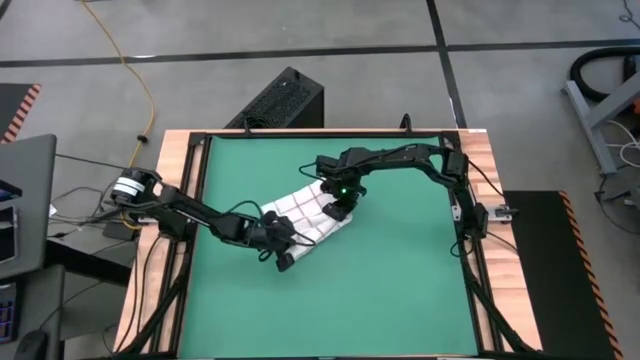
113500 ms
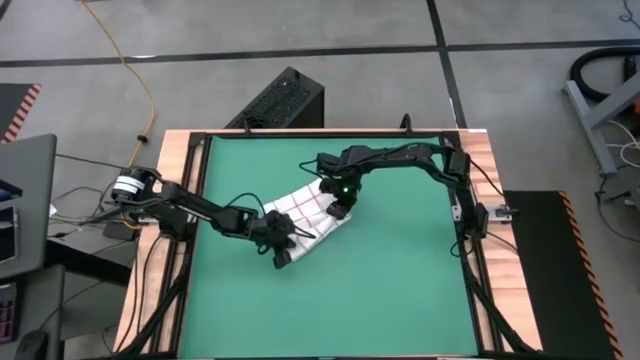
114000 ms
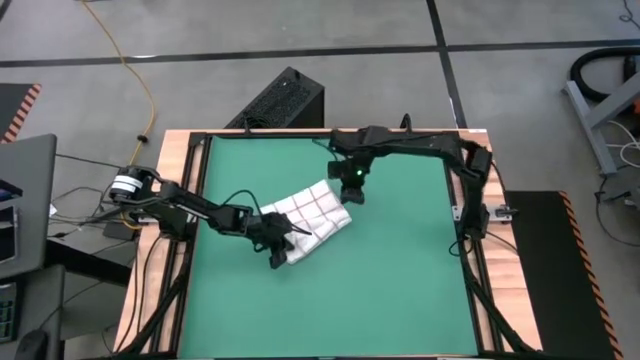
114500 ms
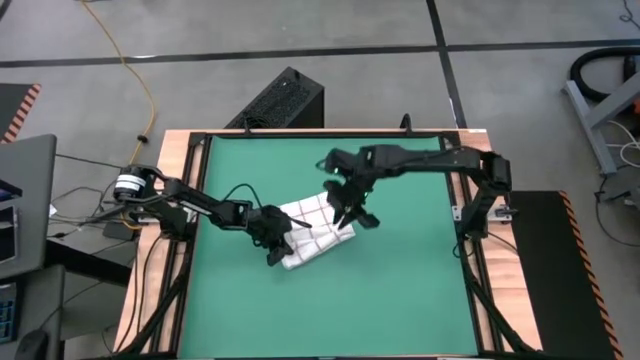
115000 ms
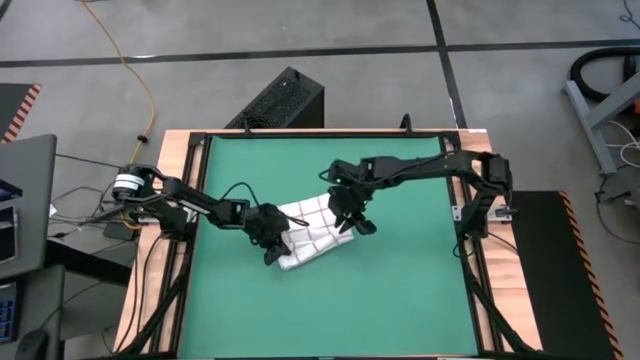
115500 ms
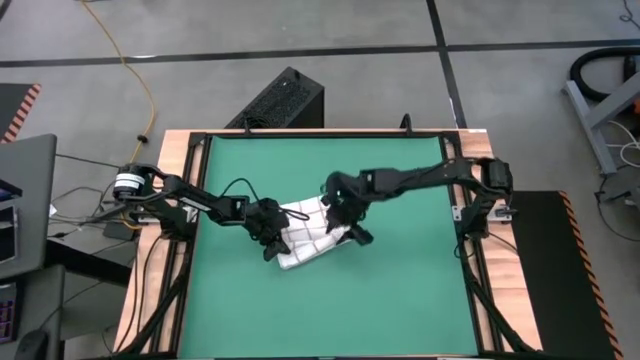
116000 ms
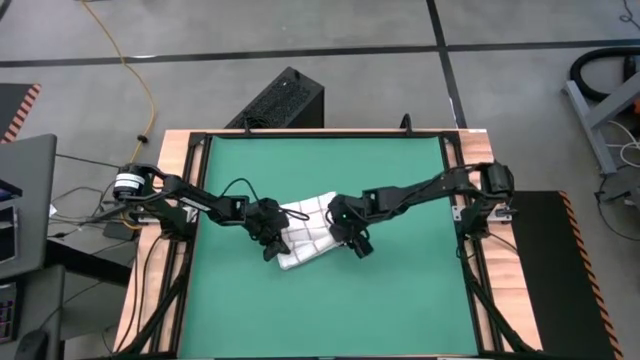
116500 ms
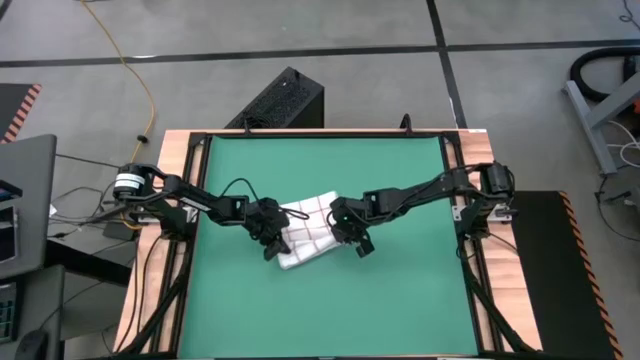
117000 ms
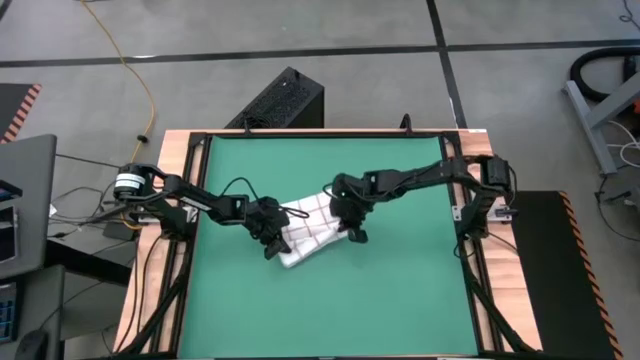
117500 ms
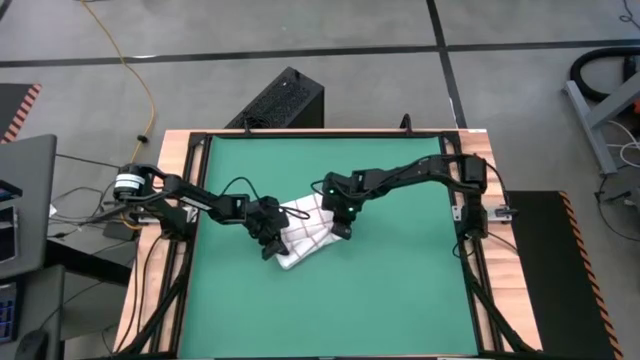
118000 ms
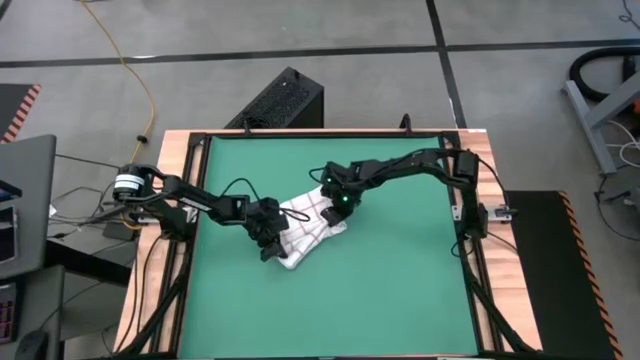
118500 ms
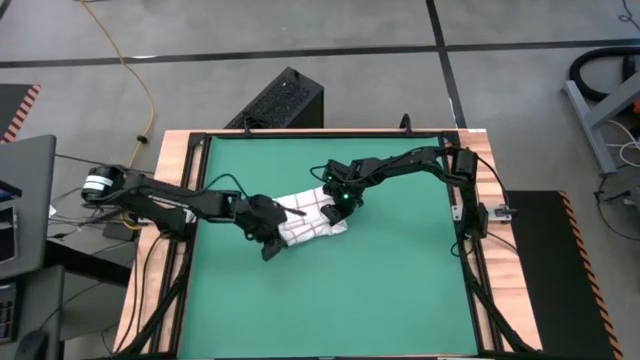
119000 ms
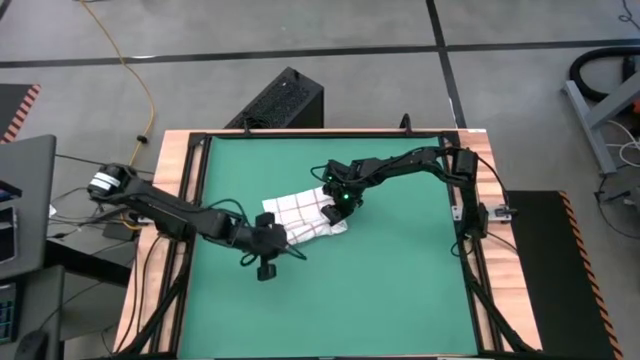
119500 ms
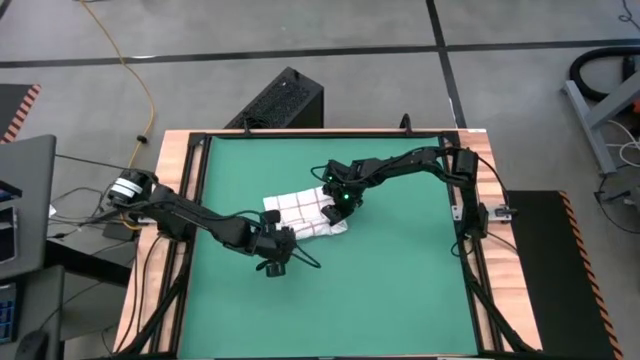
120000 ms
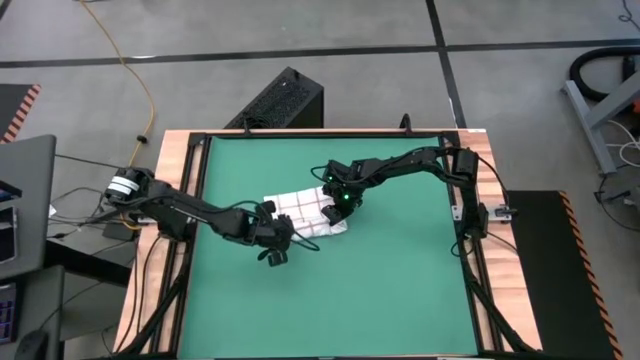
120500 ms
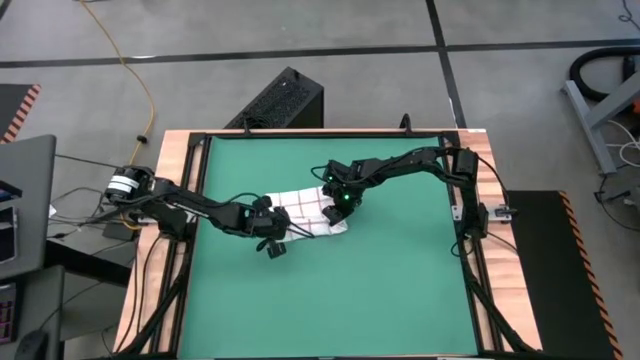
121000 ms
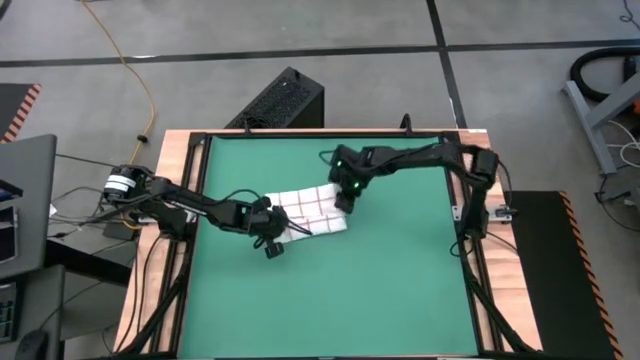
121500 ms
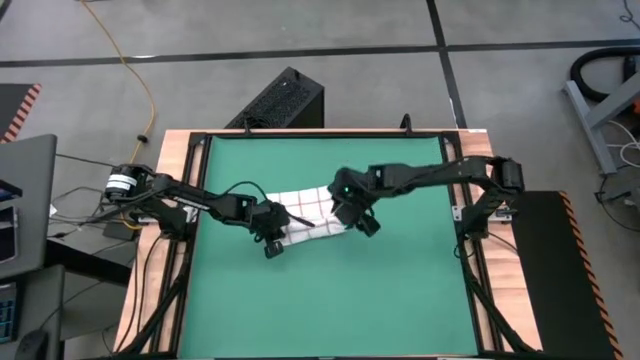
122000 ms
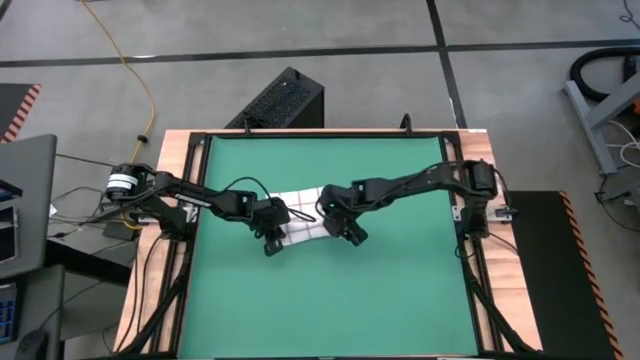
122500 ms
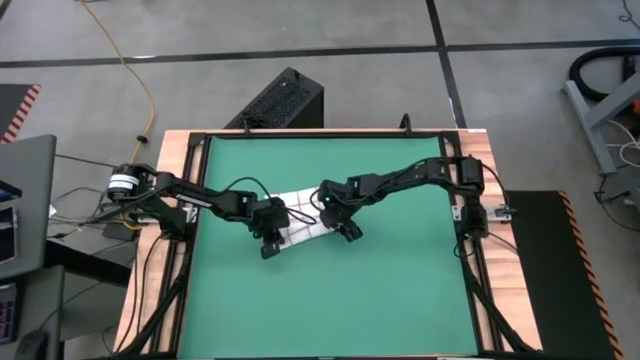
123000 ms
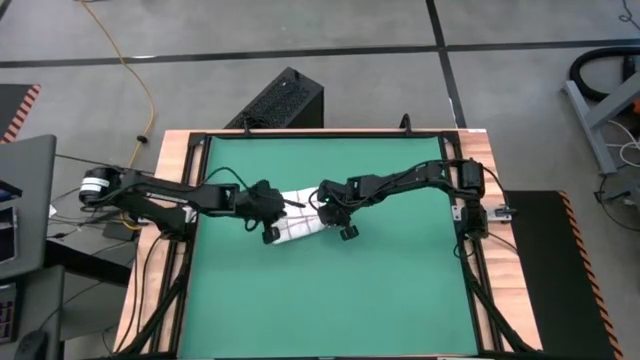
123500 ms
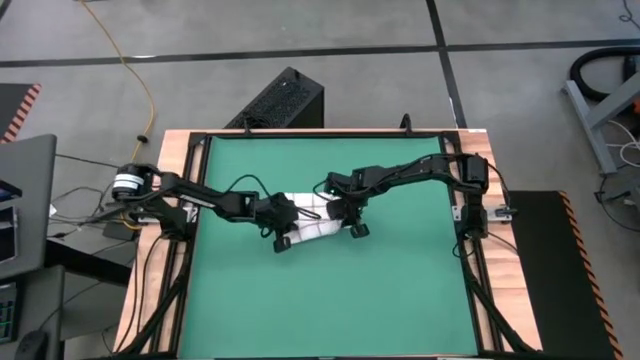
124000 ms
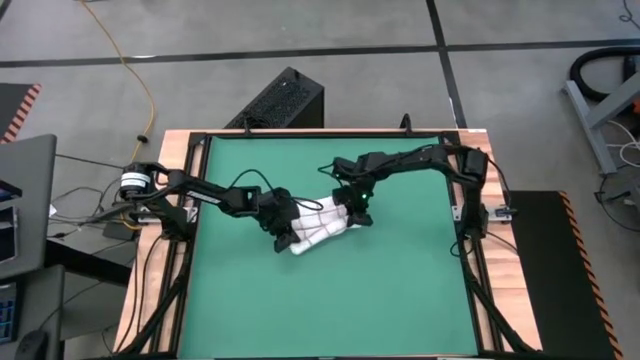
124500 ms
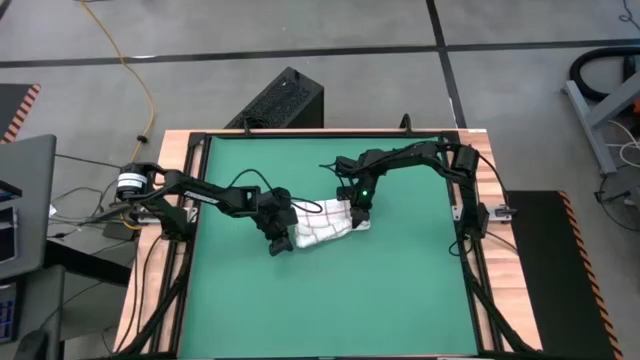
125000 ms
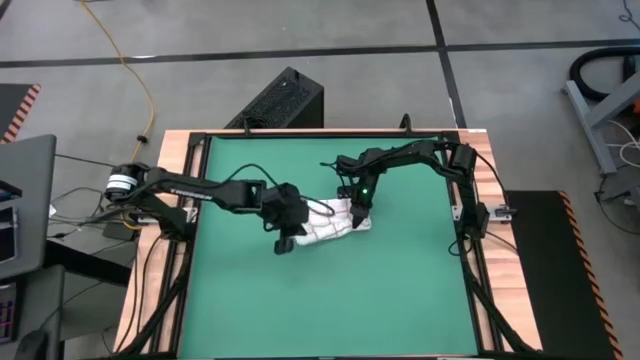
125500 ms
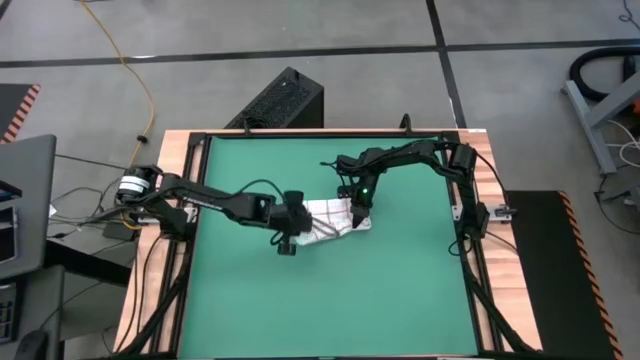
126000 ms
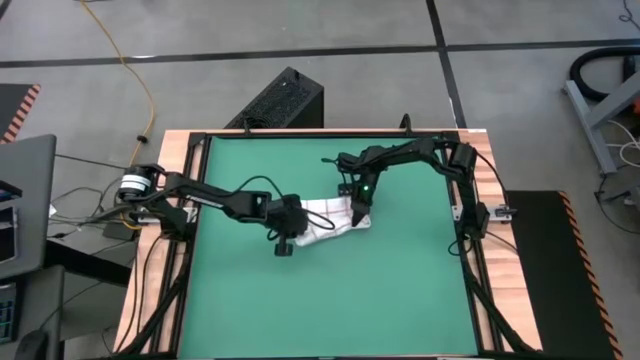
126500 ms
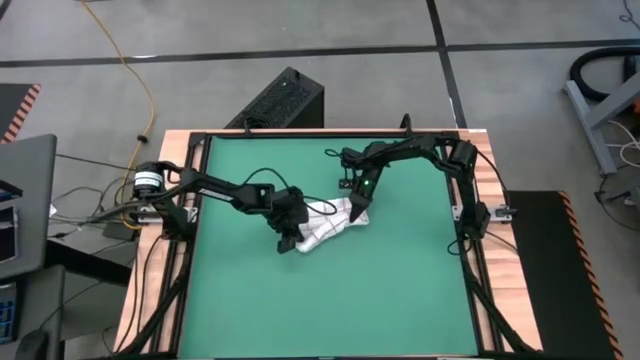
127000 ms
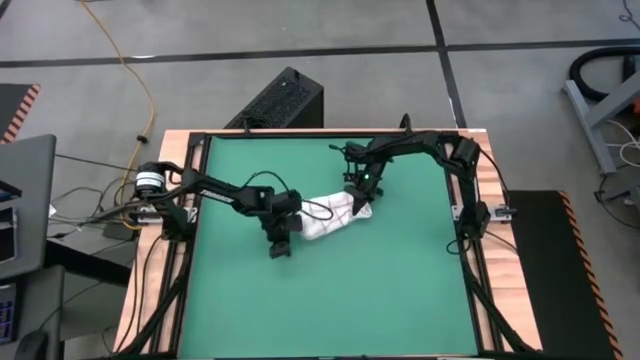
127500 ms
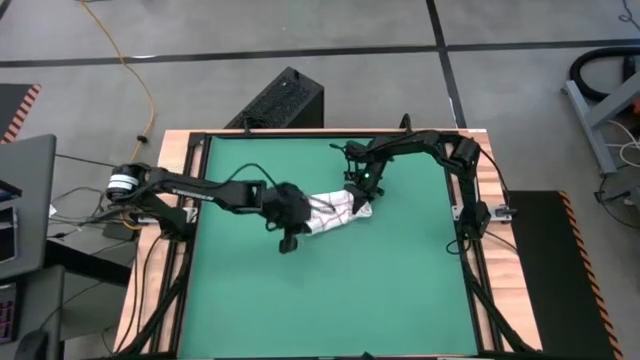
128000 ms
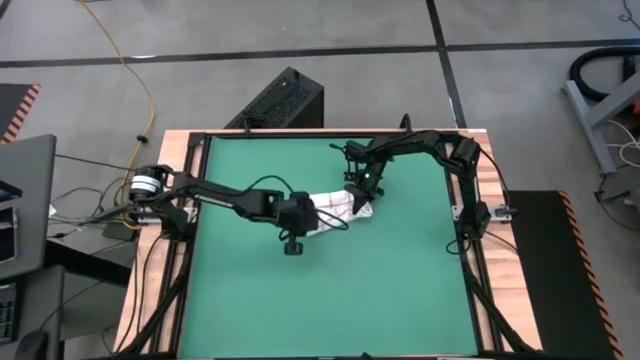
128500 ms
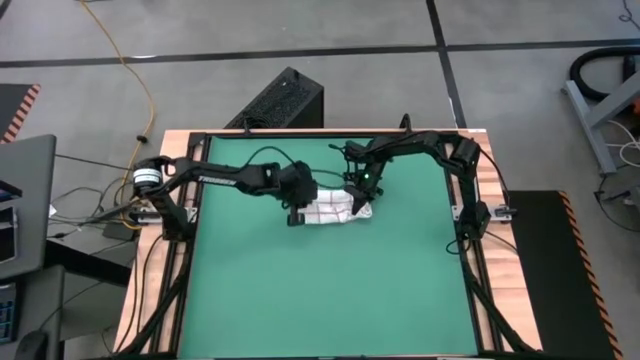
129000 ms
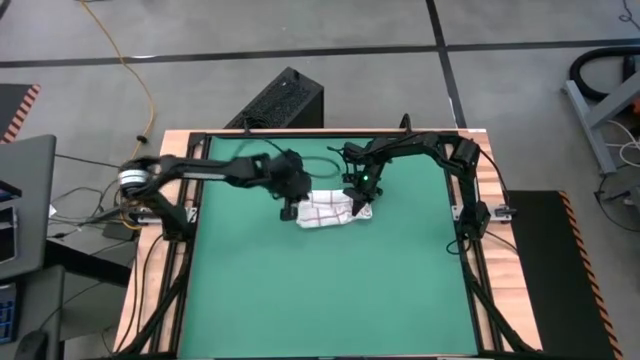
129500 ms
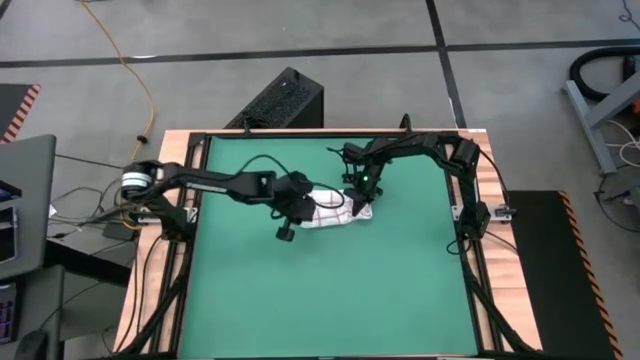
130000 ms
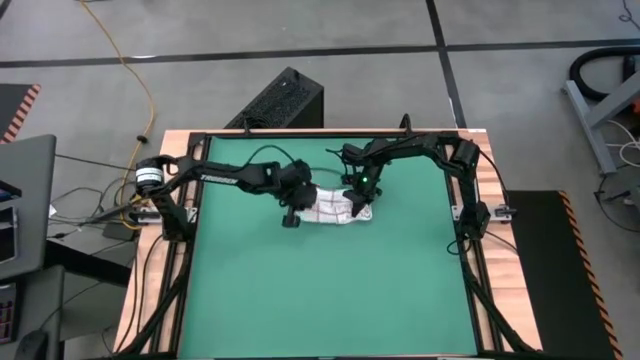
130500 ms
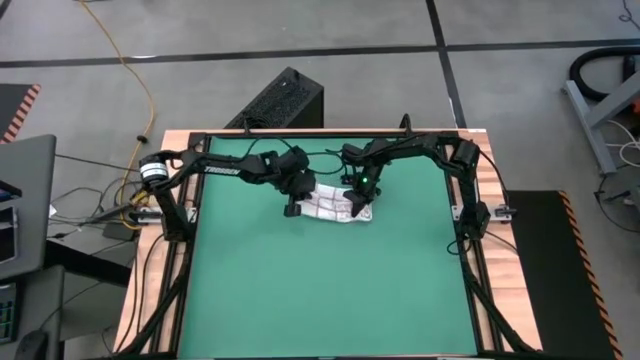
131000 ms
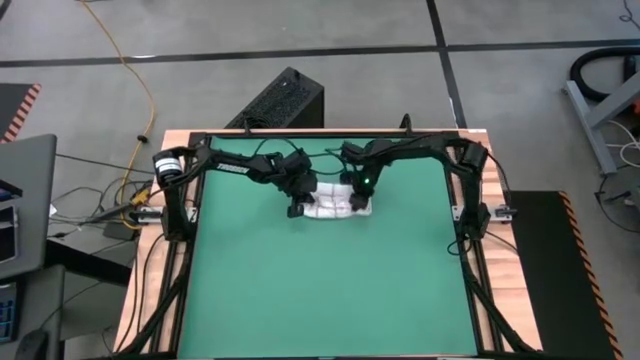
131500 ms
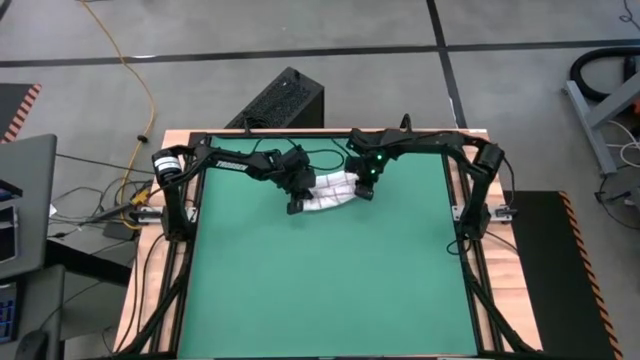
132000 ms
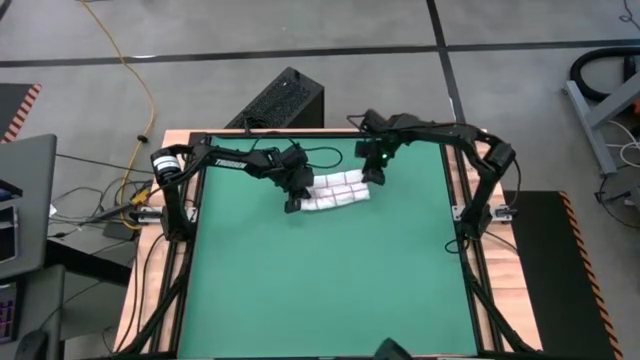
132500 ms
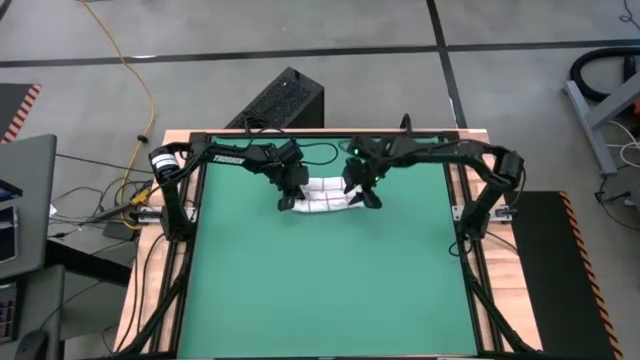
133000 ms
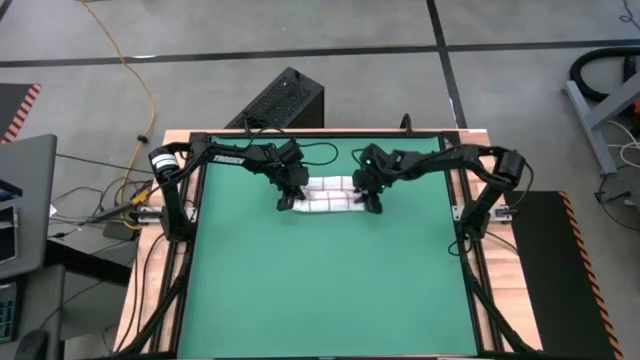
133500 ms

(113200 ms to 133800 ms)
Task: Roll towel
Roll the white towel
